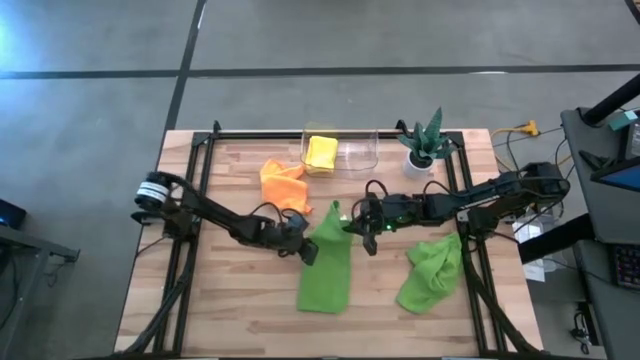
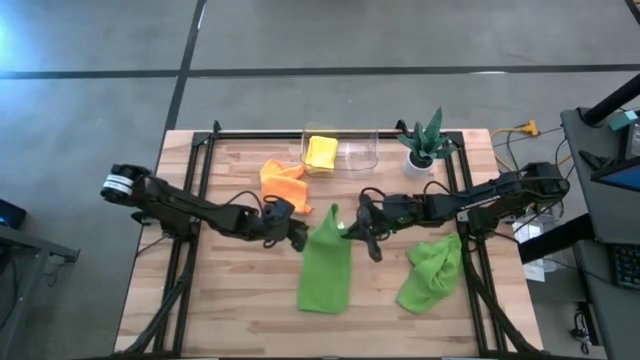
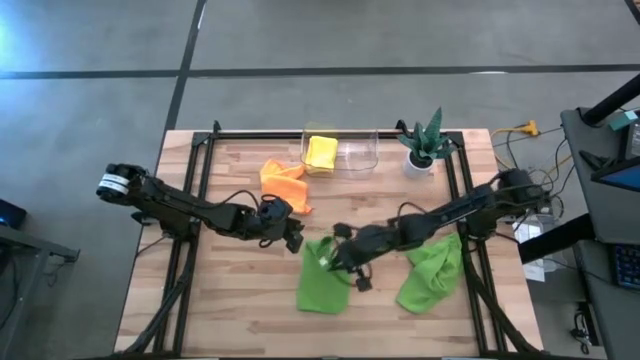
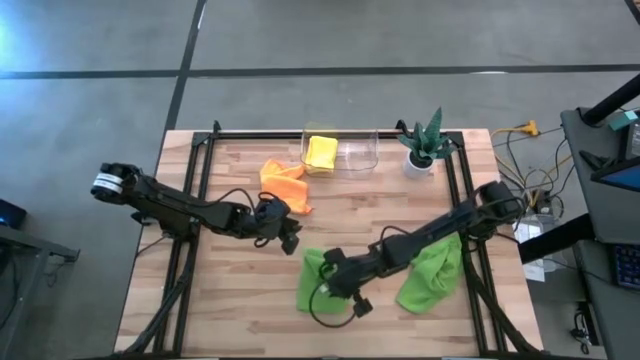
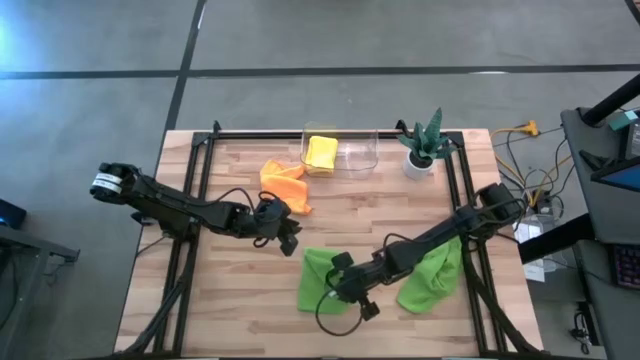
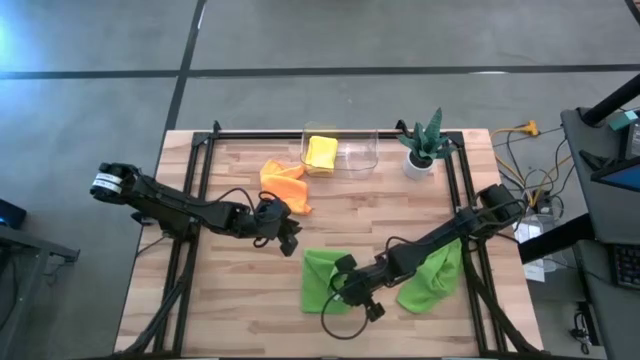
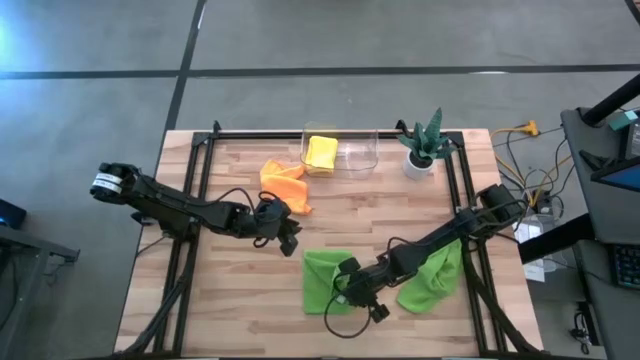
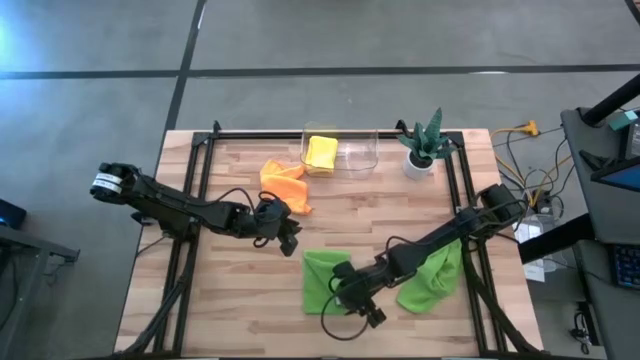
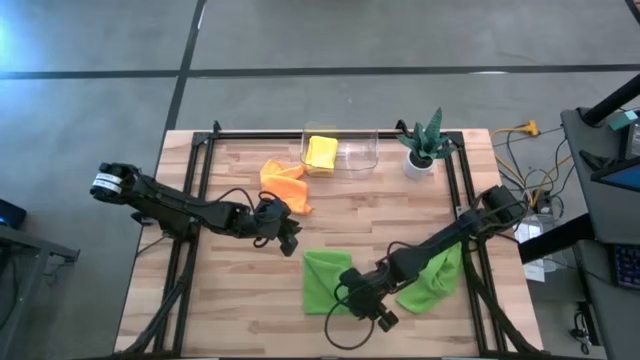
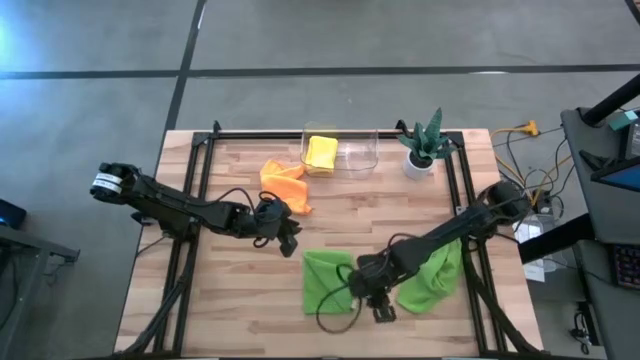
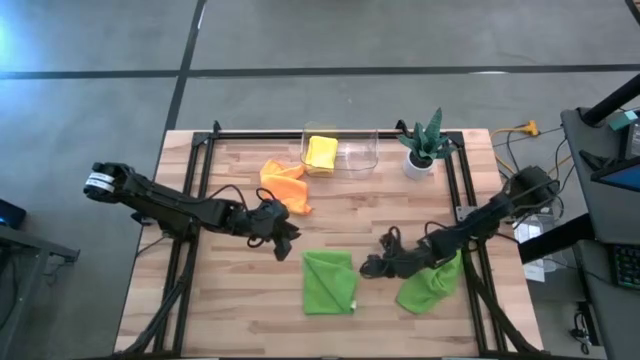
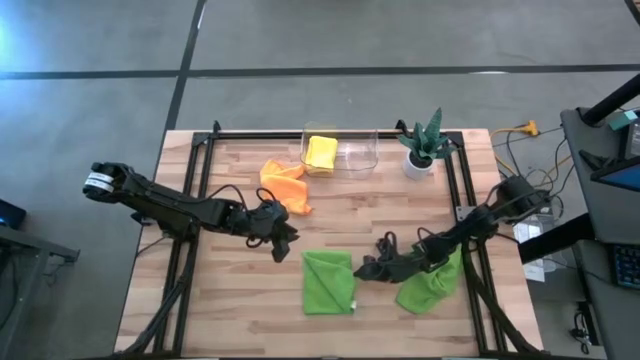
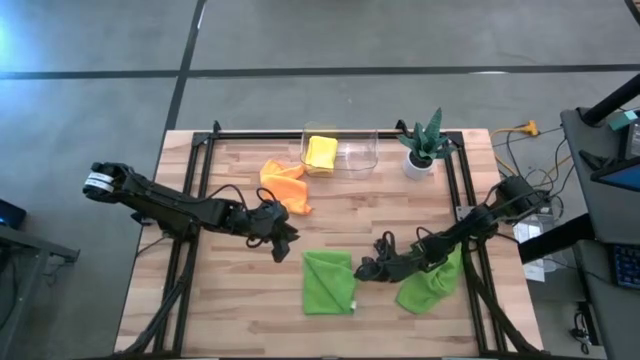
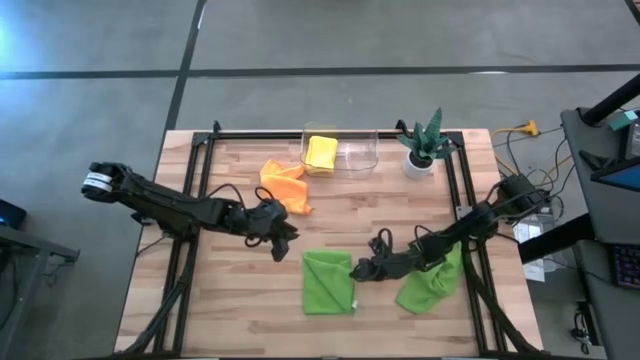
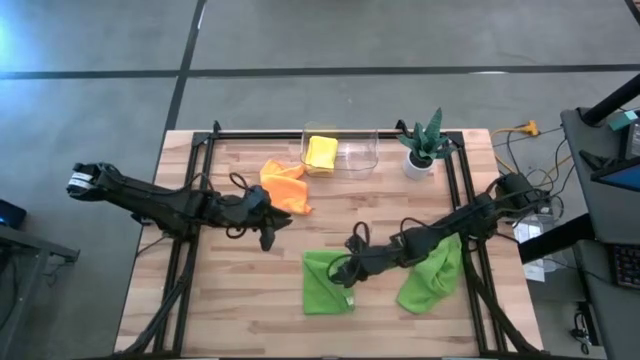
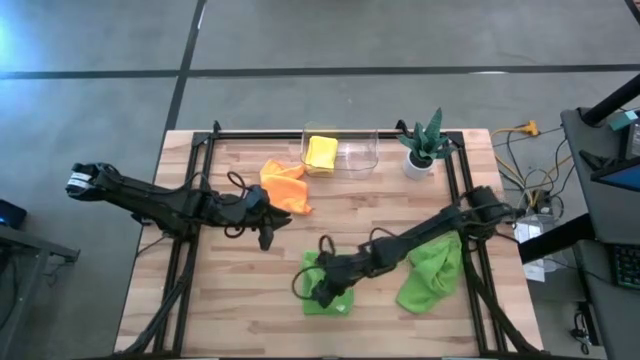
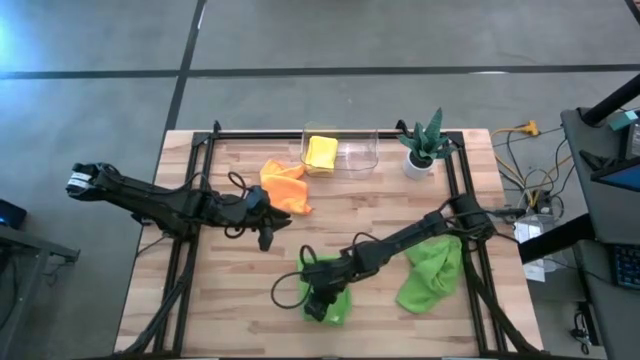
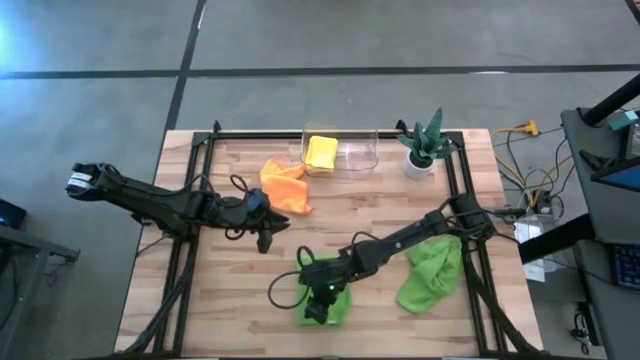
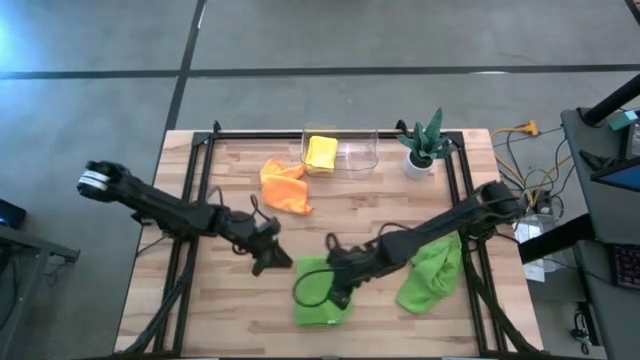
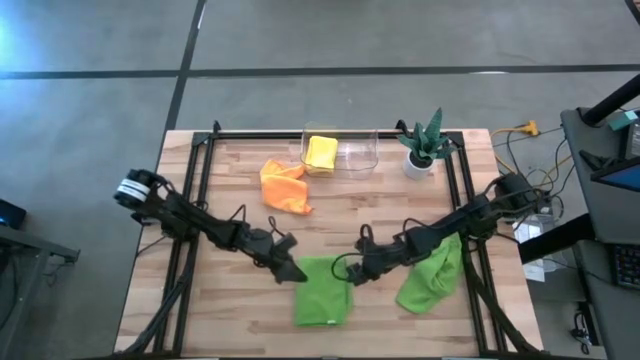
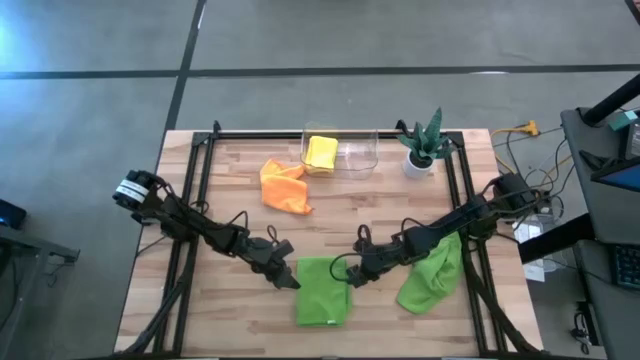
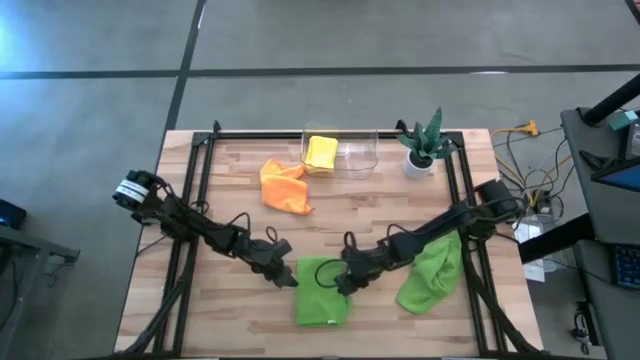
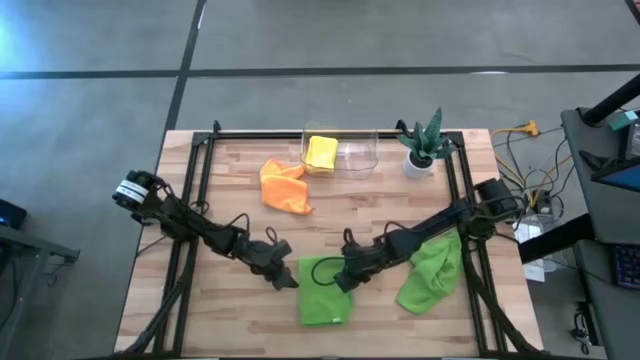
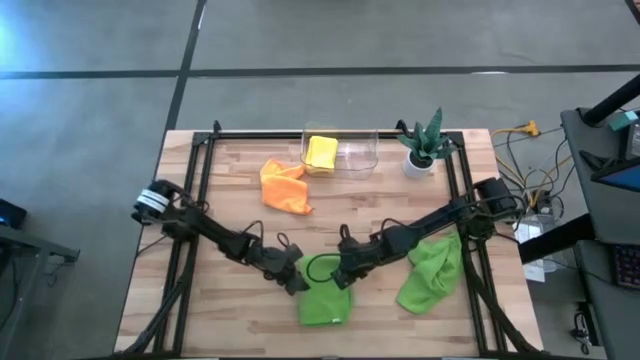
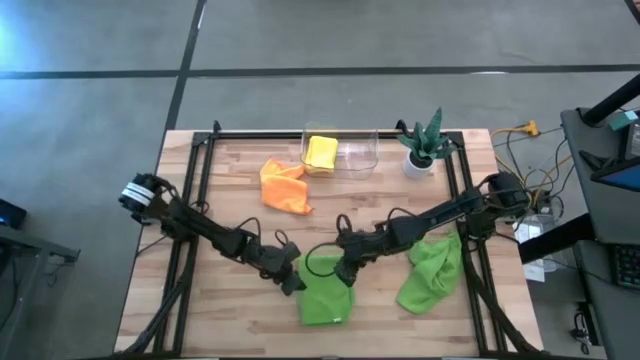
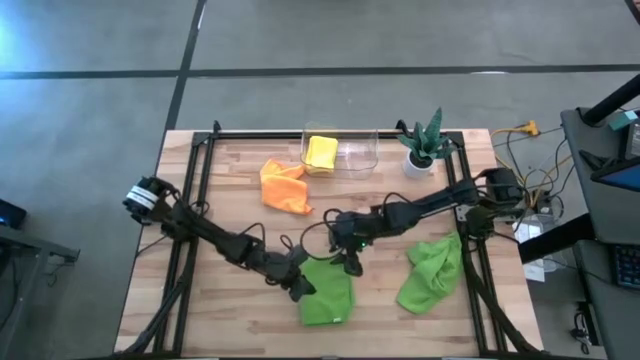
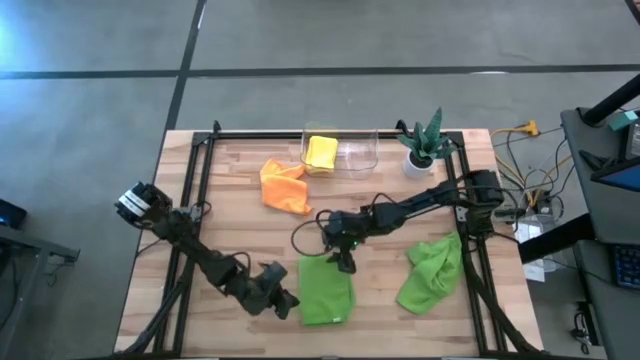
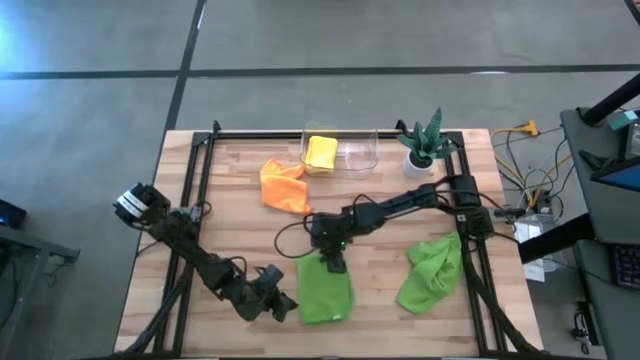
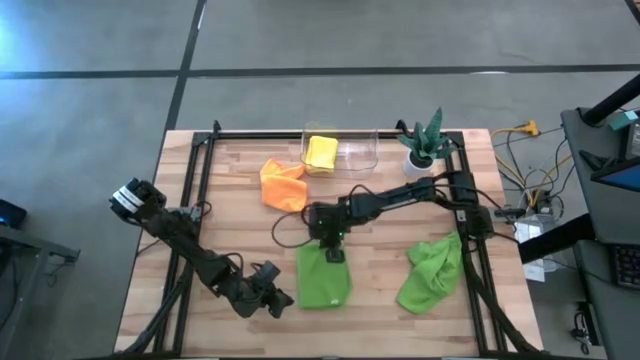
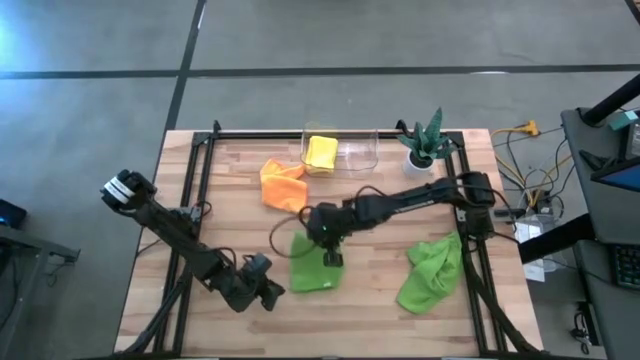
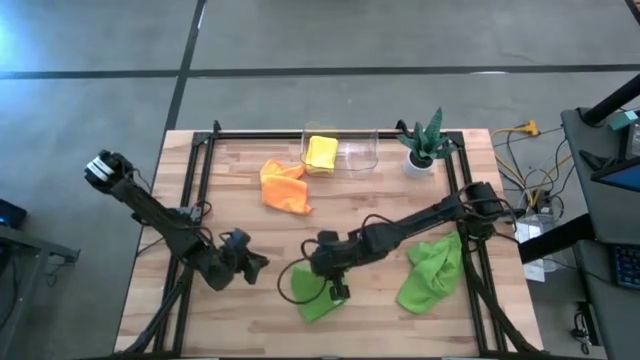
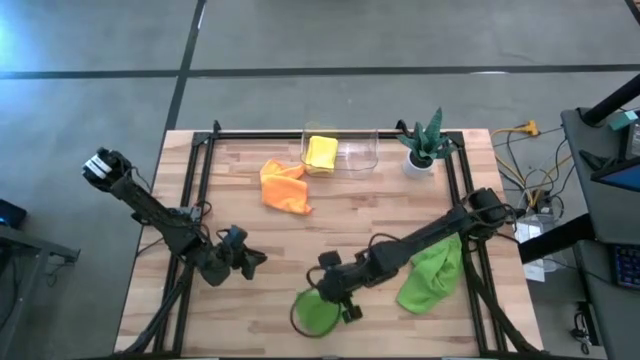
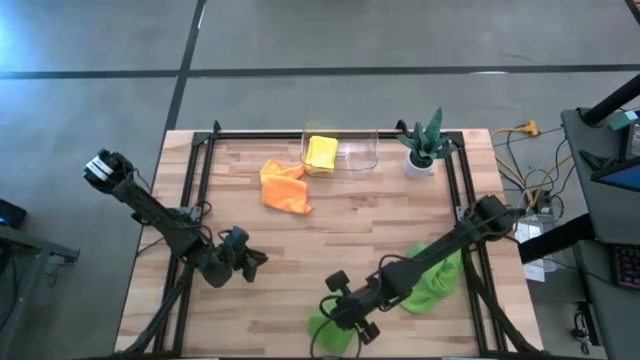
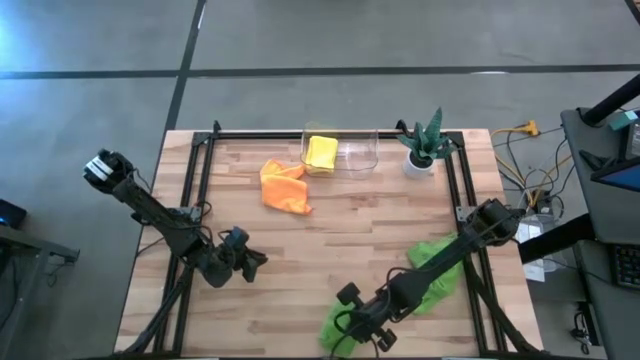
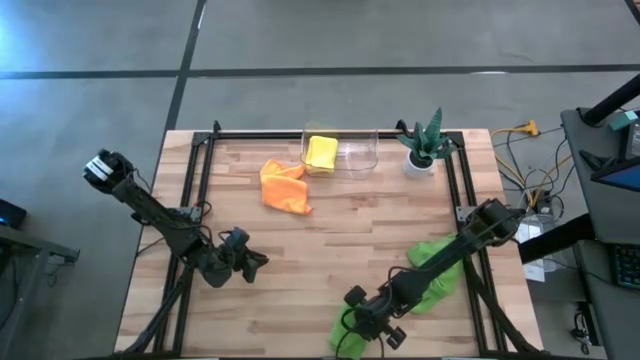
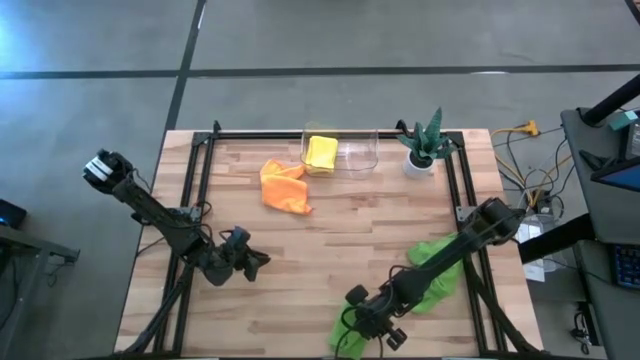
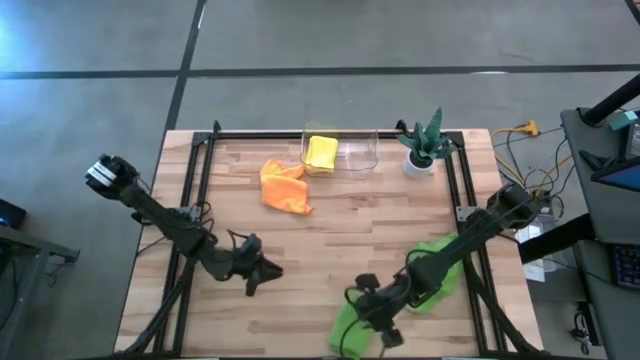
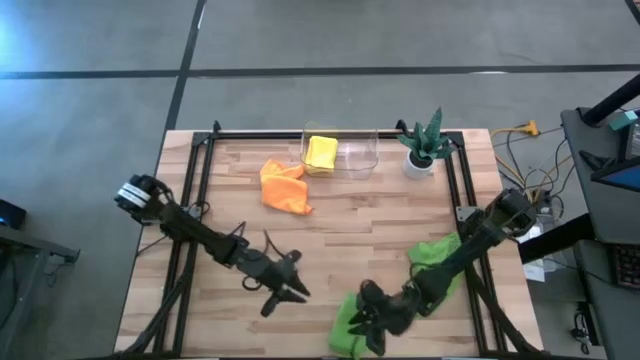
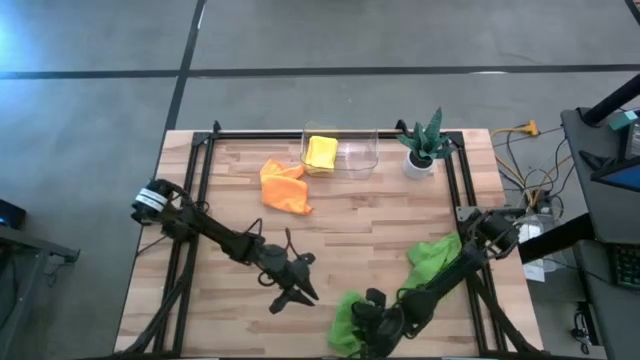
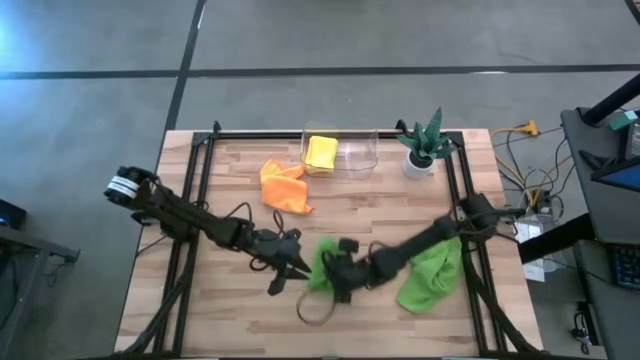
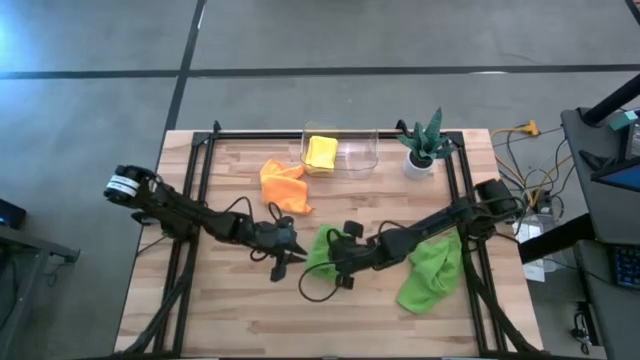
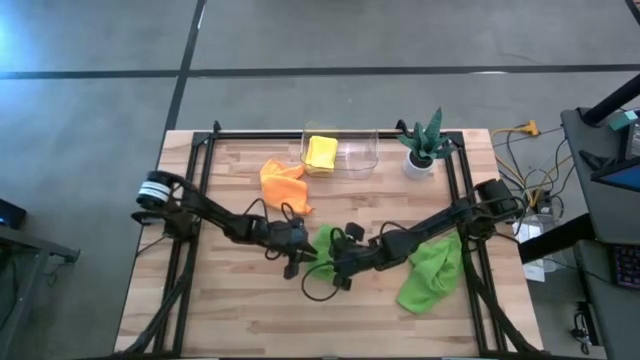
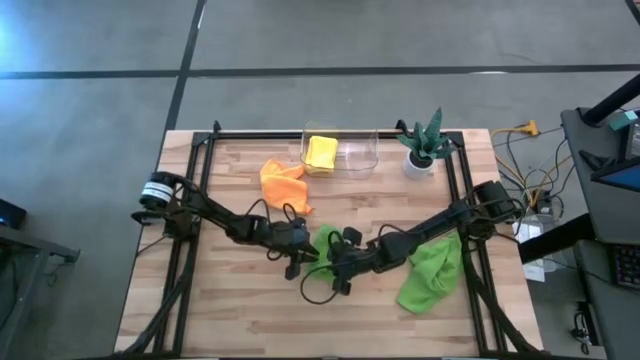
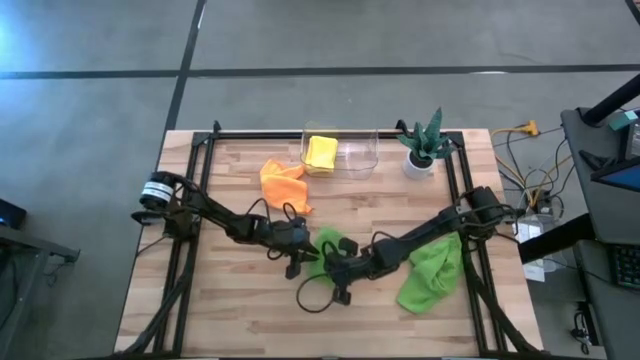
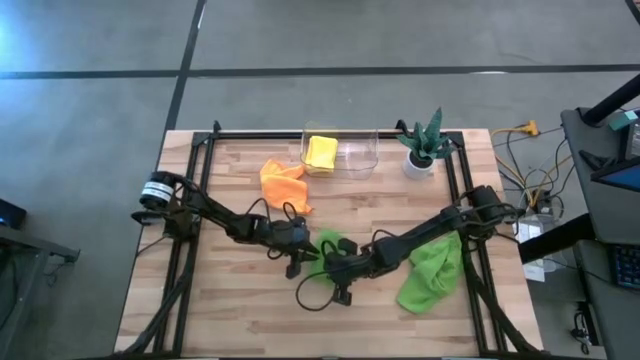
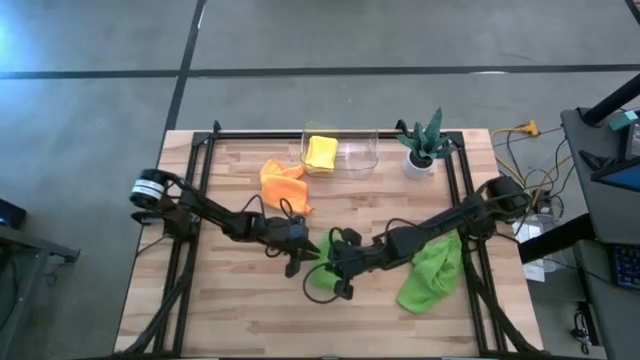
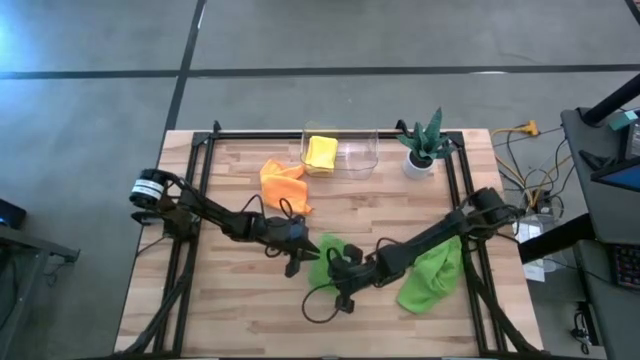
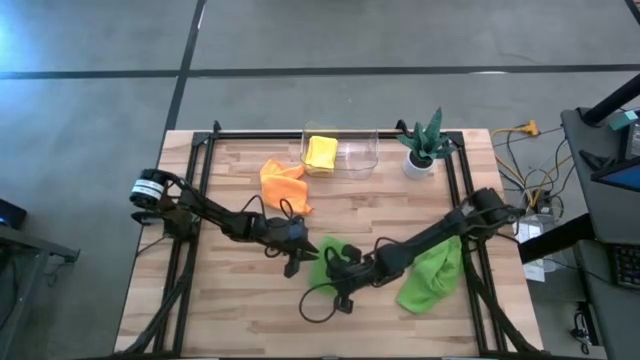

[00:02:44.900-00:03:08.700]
Task: Fold microfiber towels
Fold the left green microfiber towel
